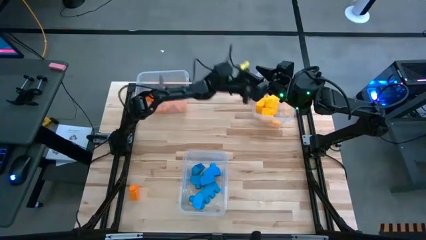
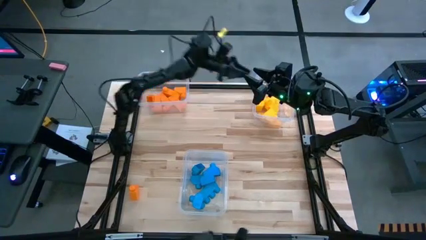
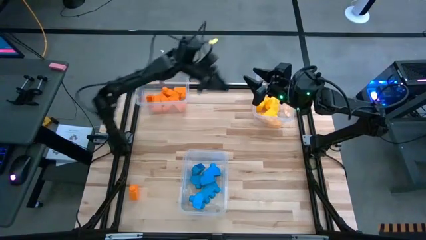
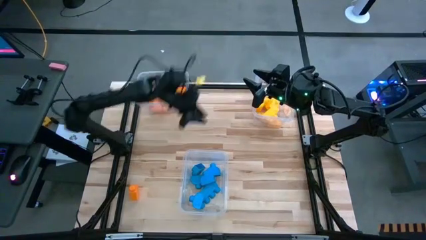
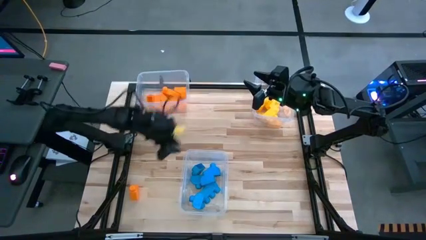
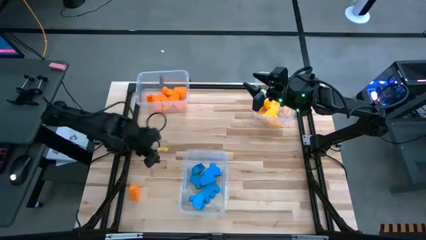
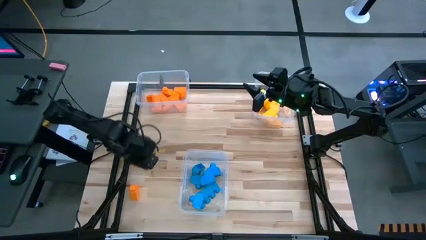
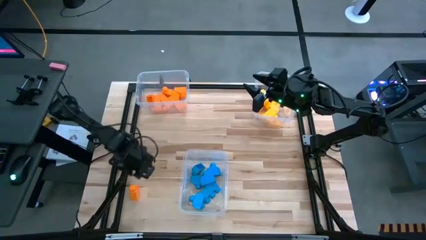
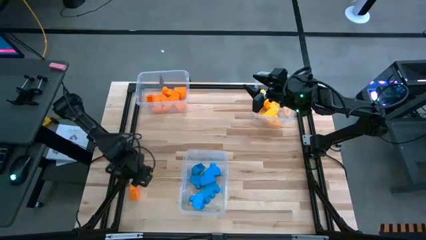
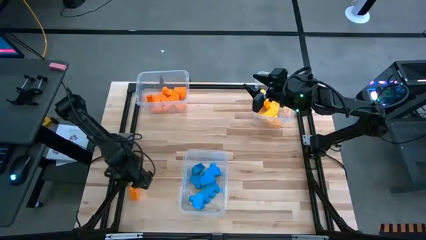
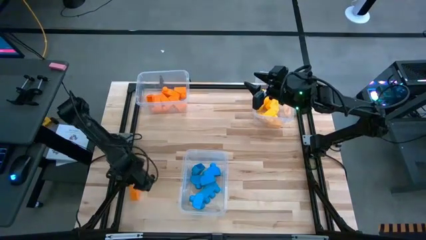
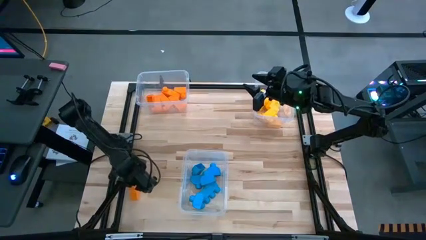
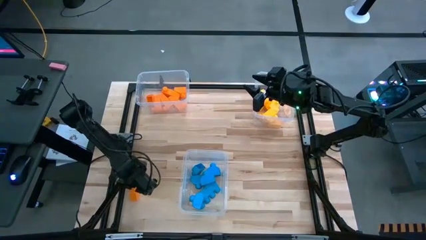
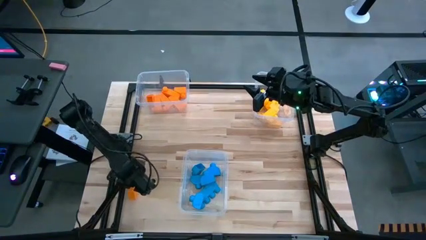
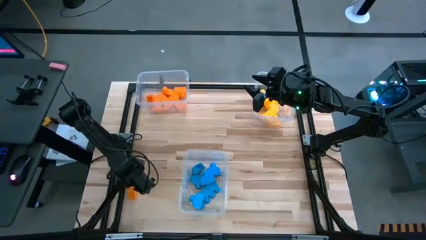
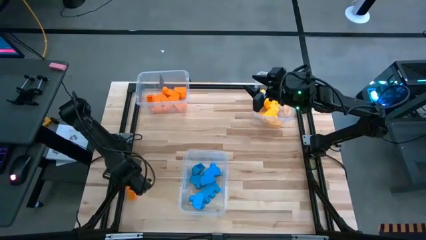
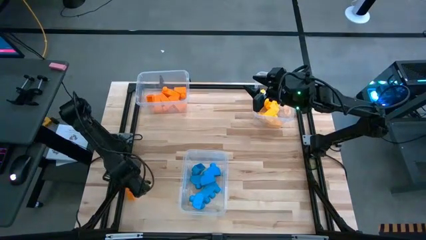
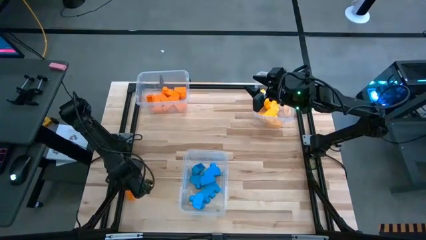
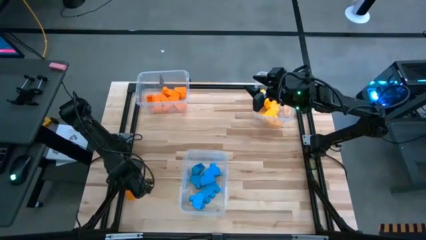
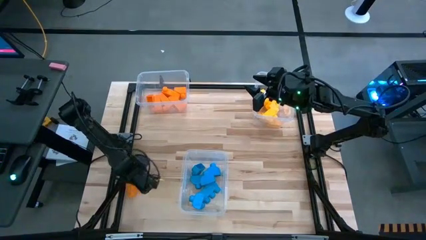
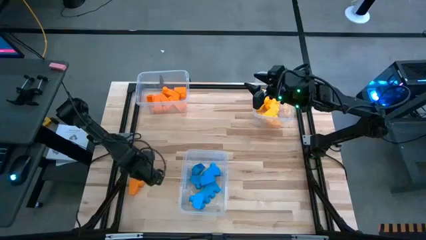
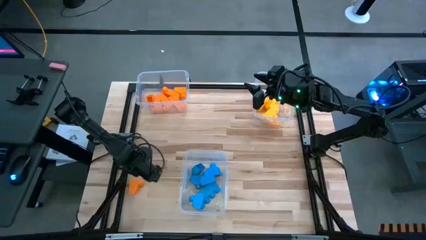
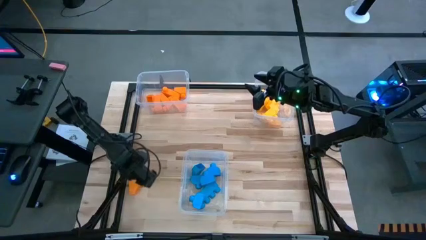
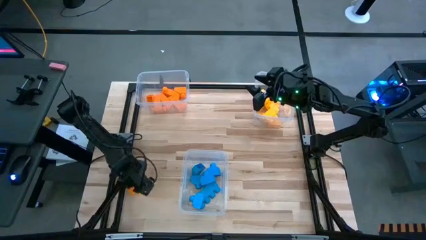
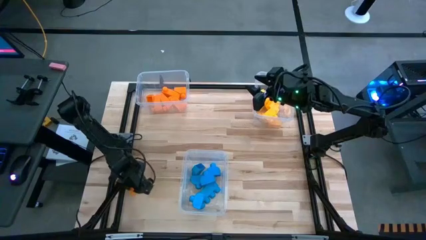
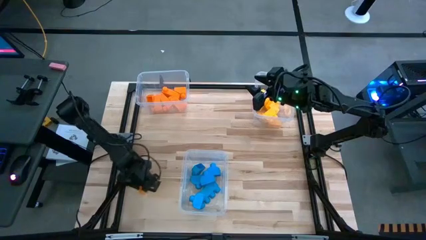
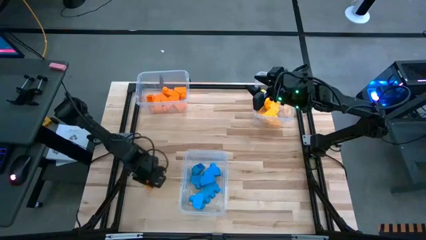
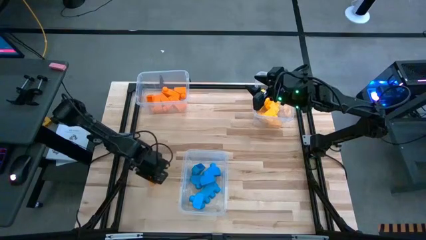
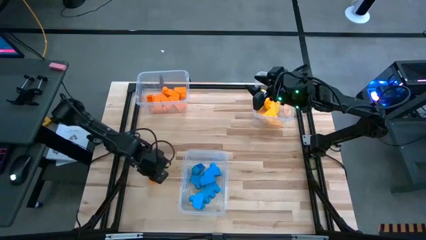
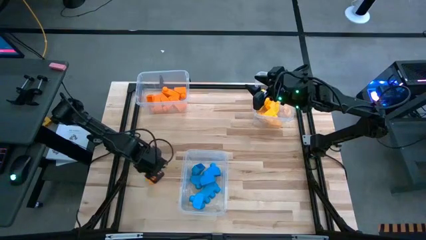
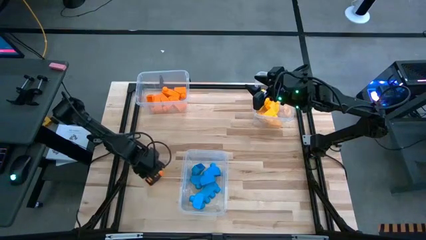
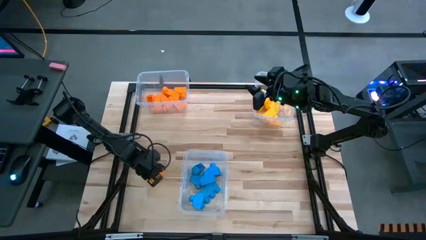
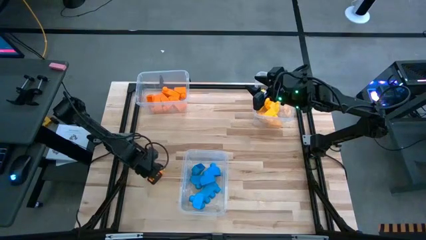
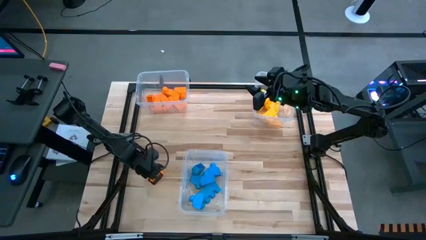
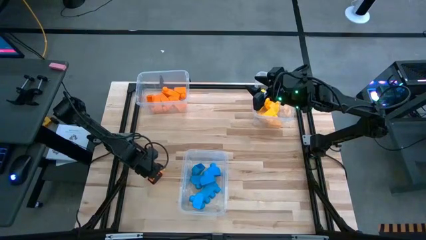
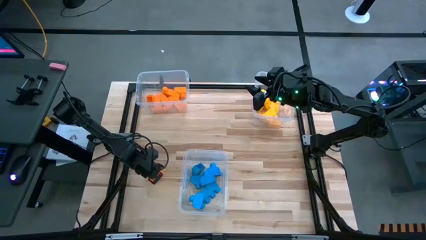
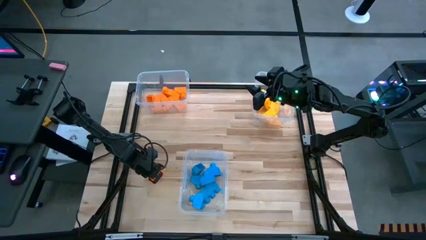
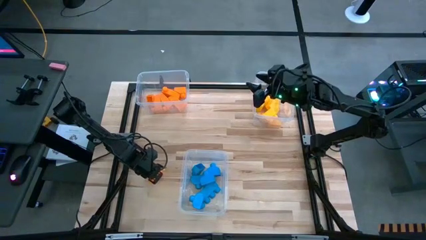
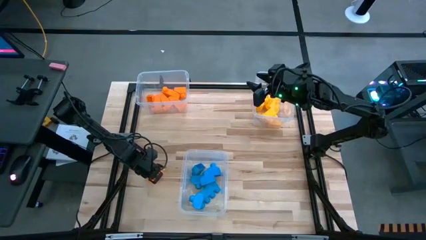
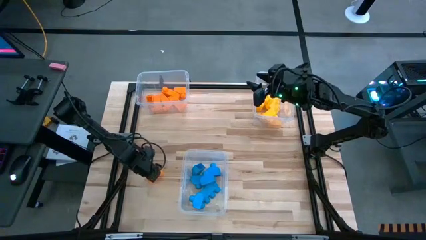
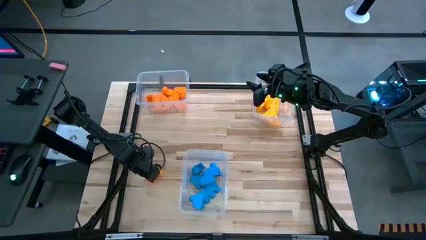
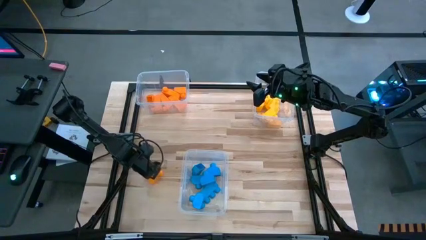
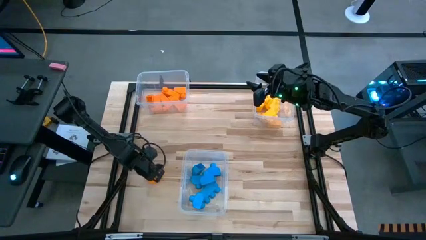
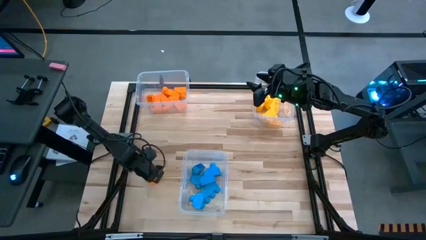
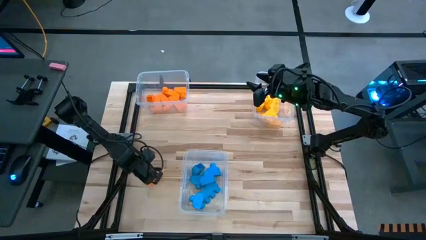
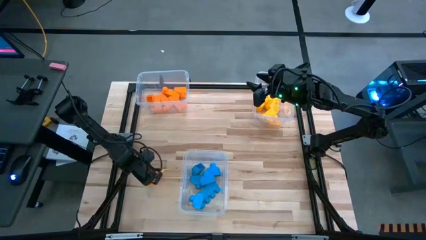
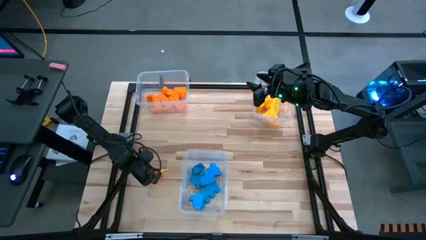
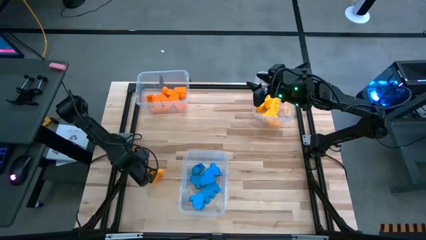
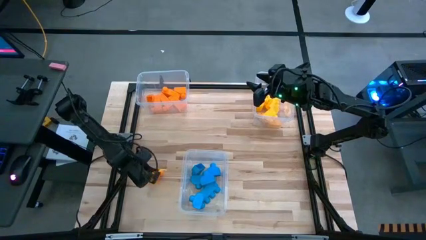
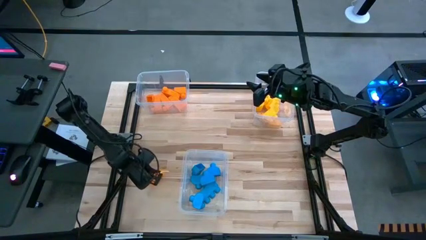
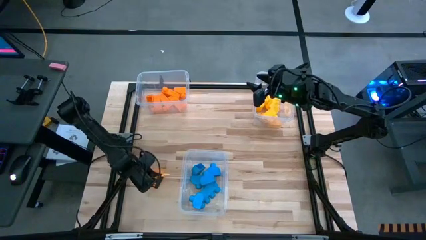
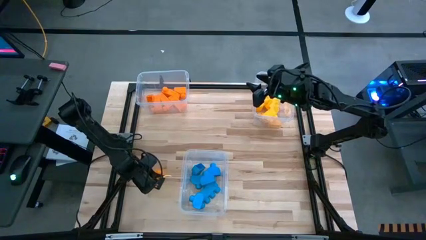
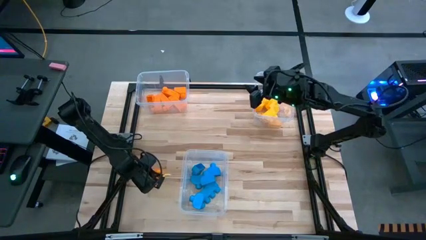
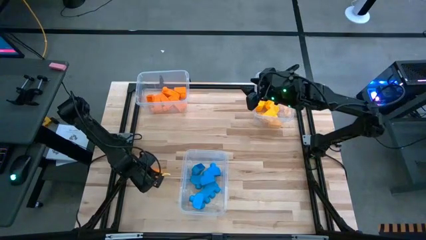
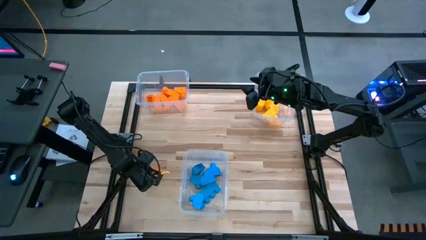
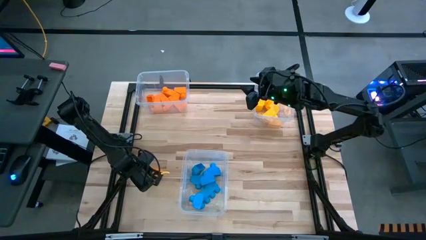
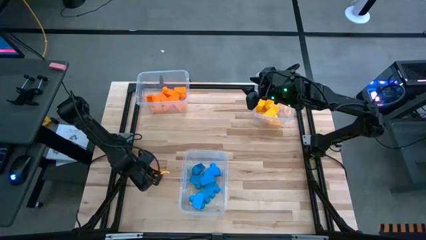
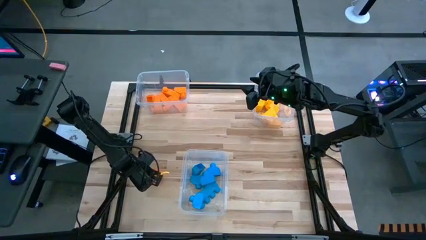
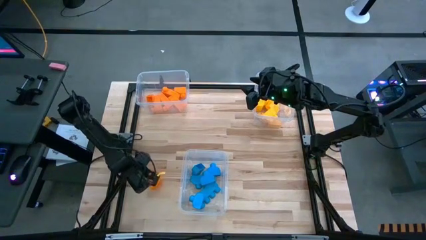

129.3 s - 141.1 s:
Task: Sort blocks
Put the orange game piece into the top left transparent bin

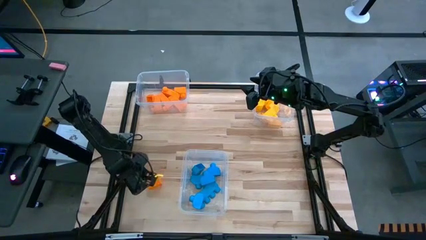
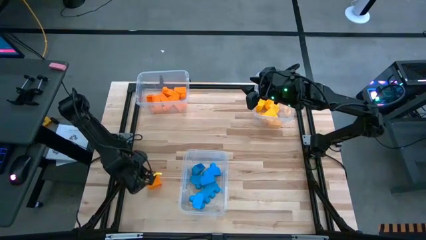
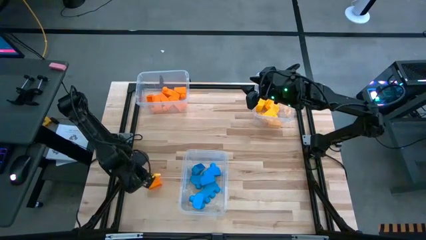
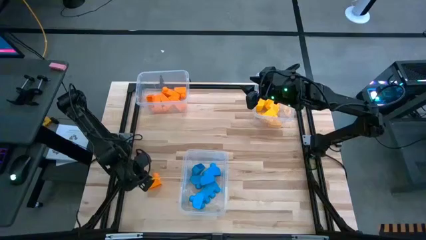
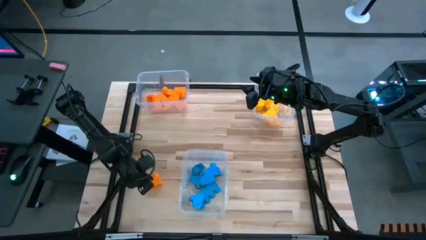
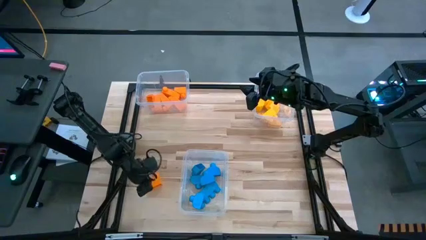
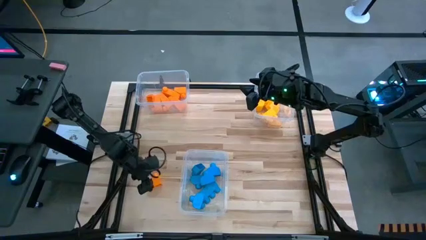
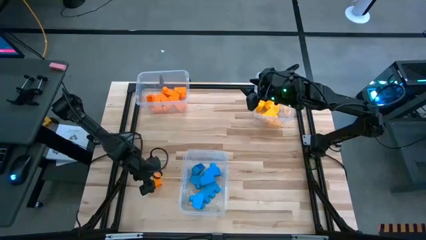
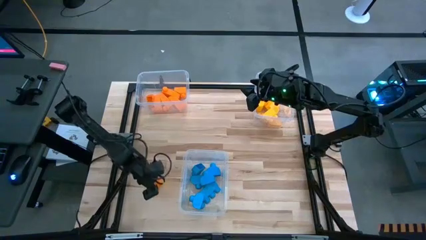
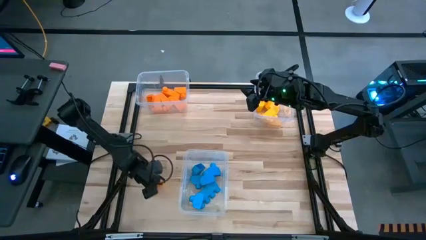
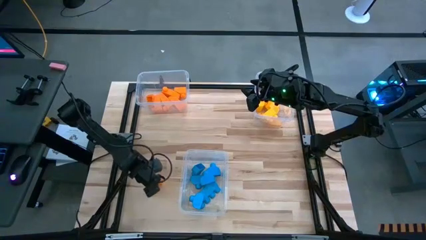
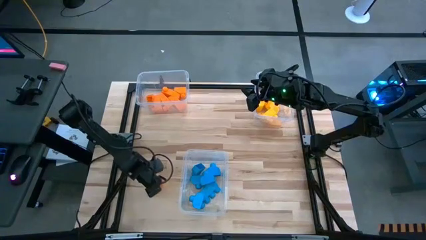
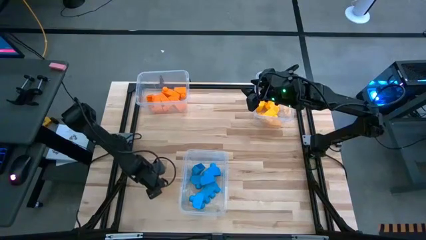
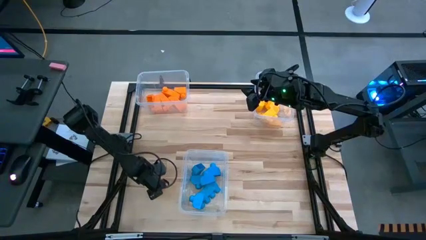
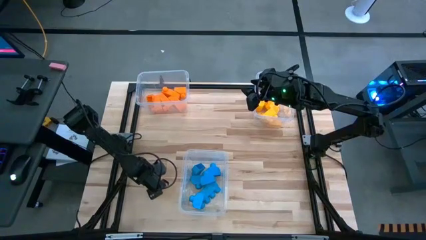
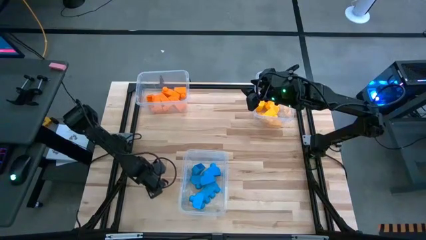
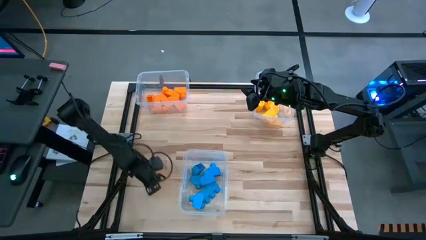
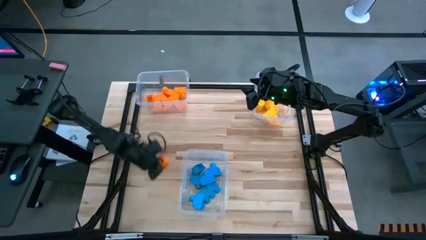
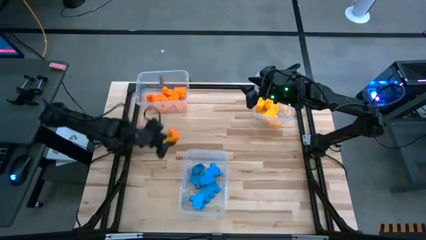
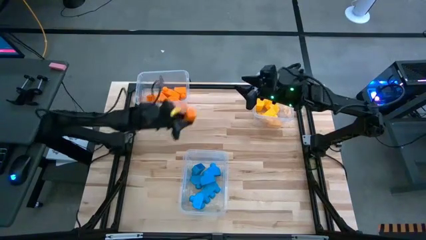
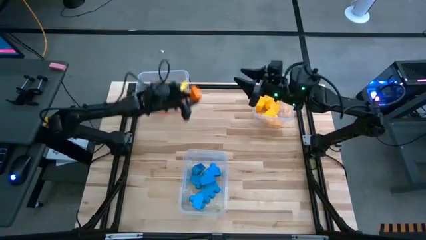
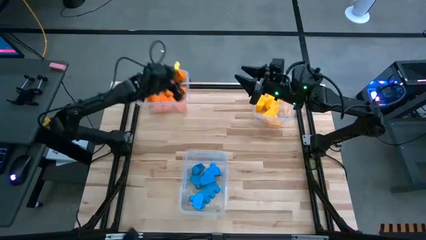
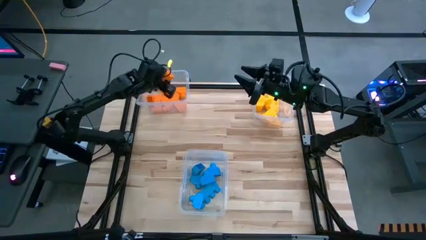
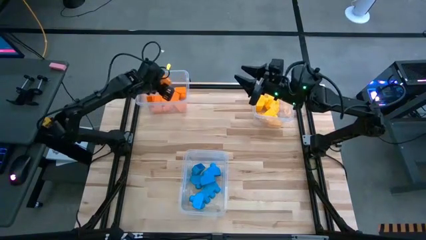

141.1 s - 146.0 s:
Put the orange game piece into the top left transparent bin

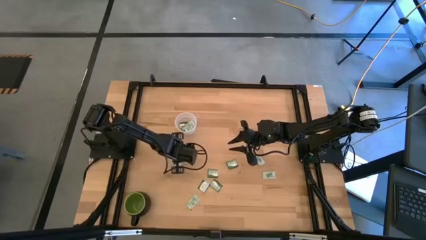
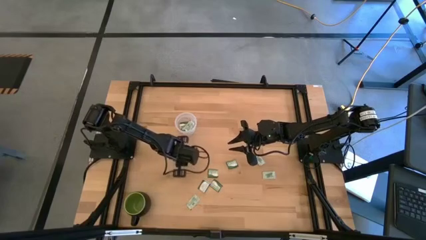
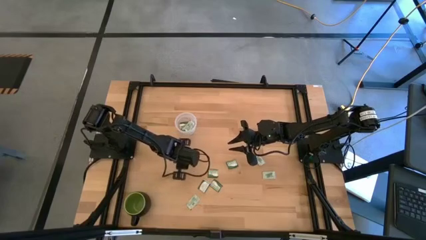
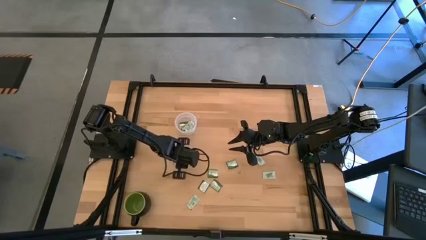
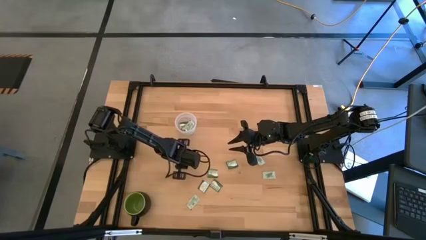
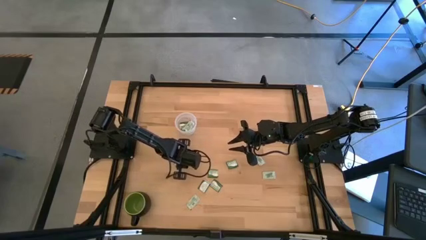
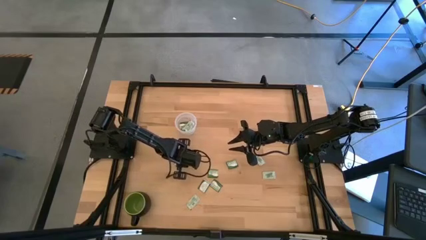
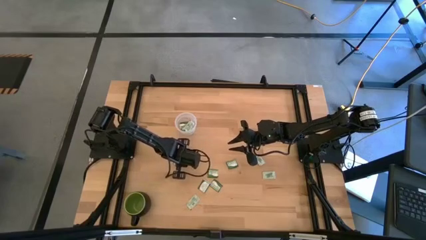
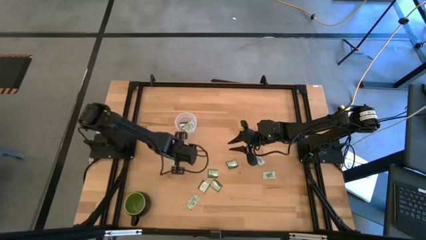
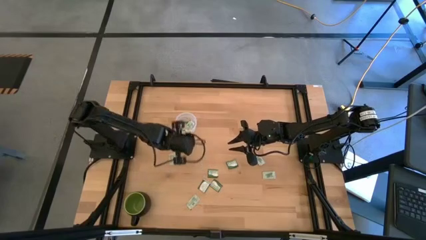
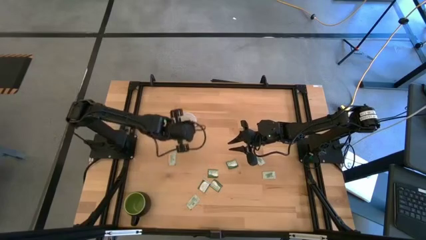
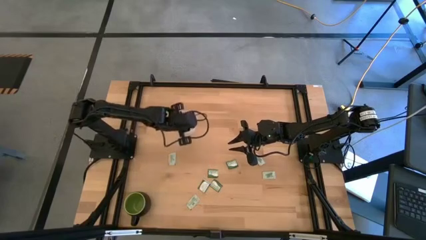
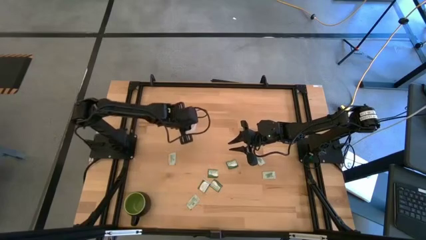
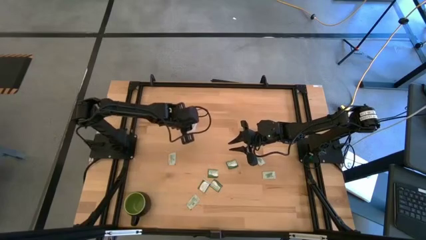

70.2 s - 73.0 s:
Task: Pick and place Stevia / Truvia into bins
Put the light green stevia packet into the transparent container
